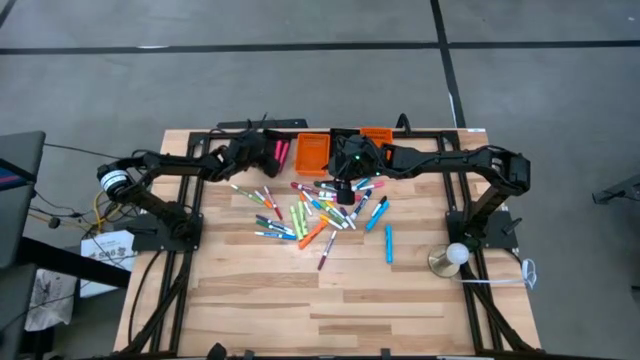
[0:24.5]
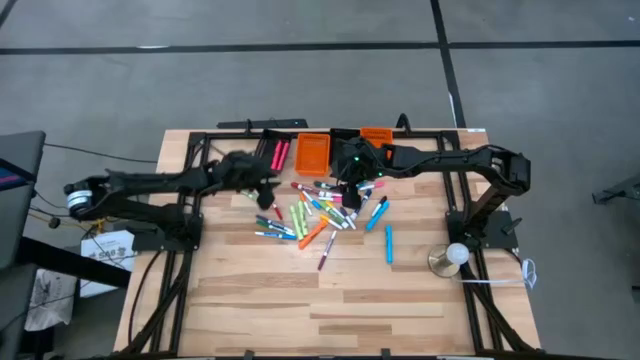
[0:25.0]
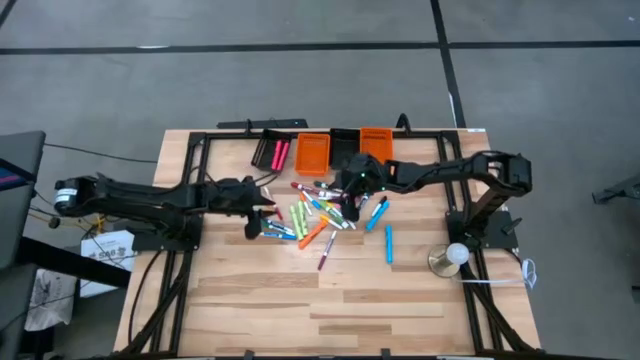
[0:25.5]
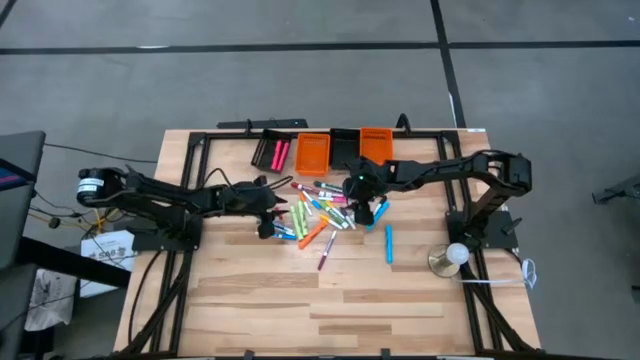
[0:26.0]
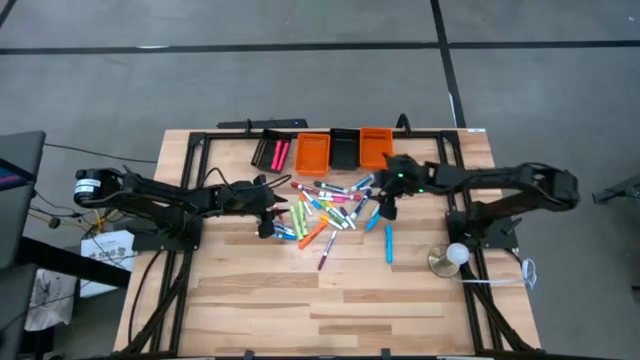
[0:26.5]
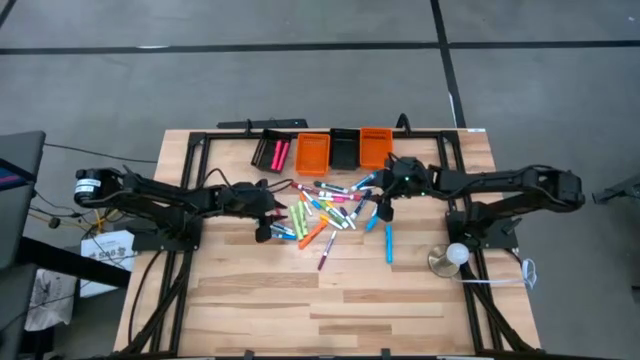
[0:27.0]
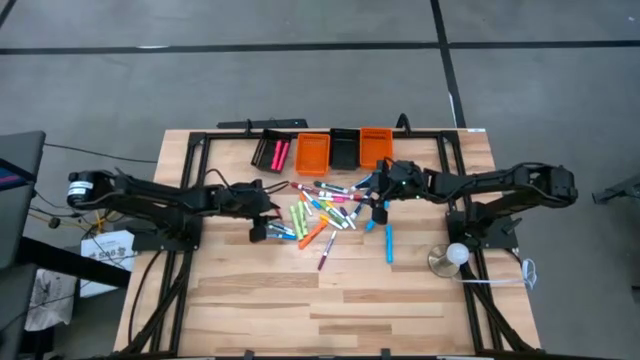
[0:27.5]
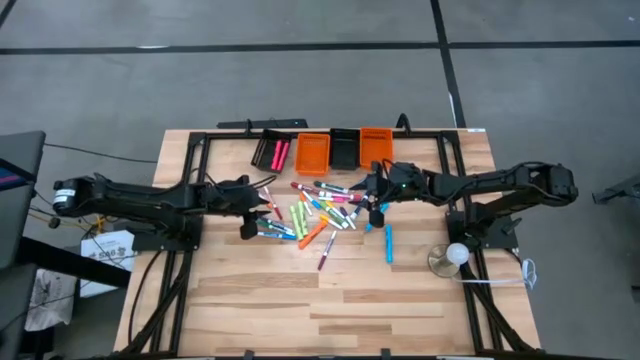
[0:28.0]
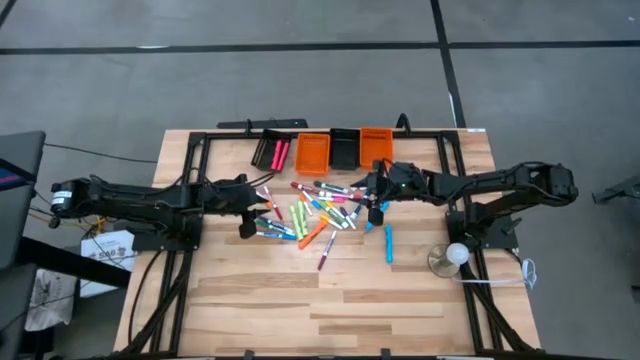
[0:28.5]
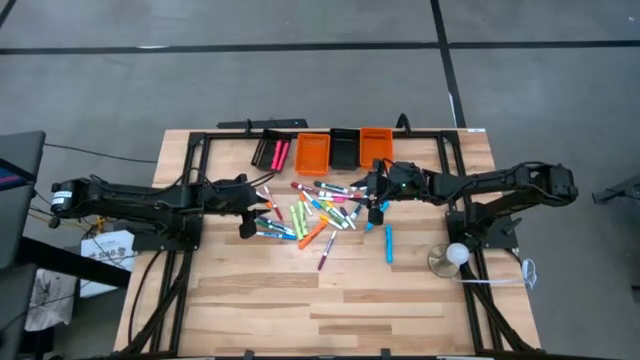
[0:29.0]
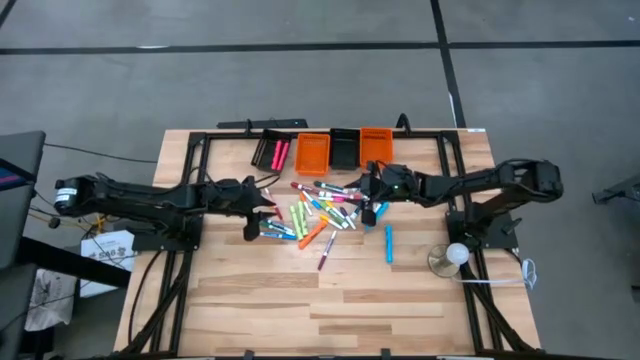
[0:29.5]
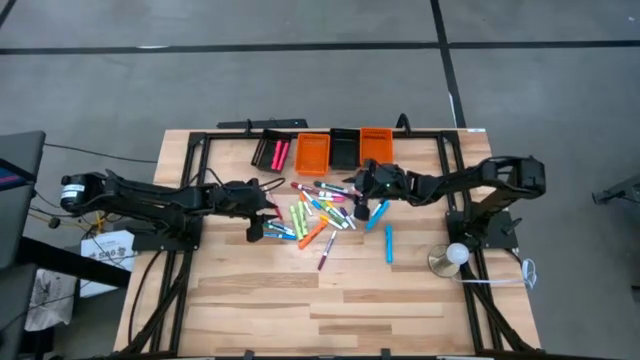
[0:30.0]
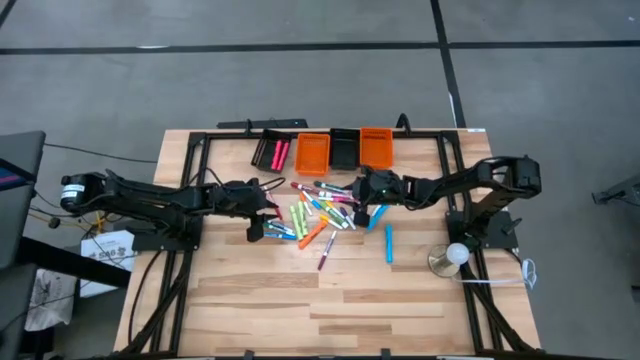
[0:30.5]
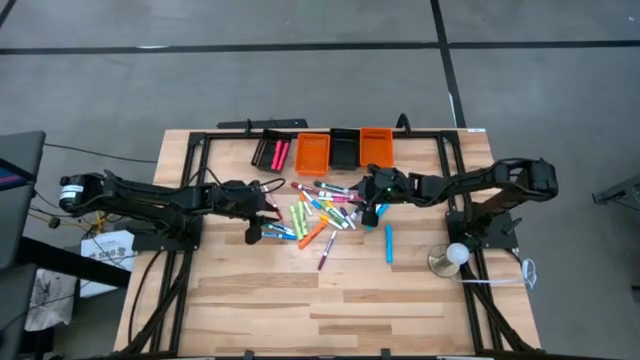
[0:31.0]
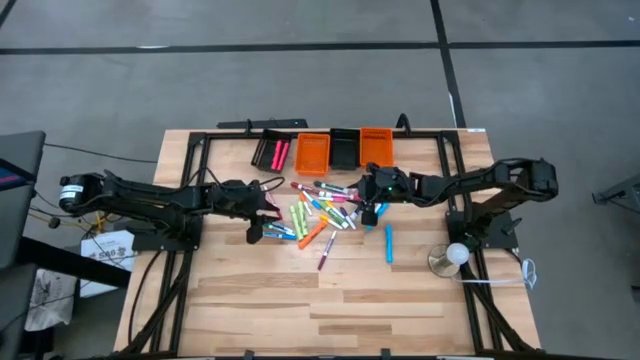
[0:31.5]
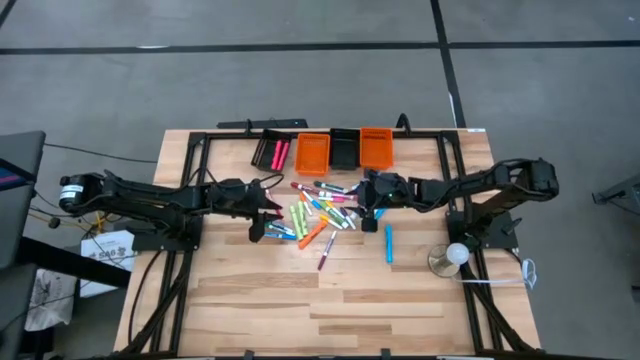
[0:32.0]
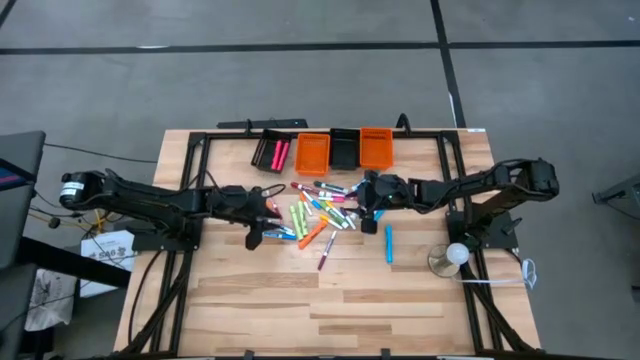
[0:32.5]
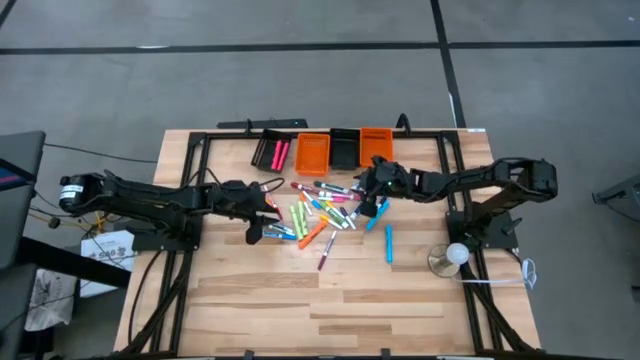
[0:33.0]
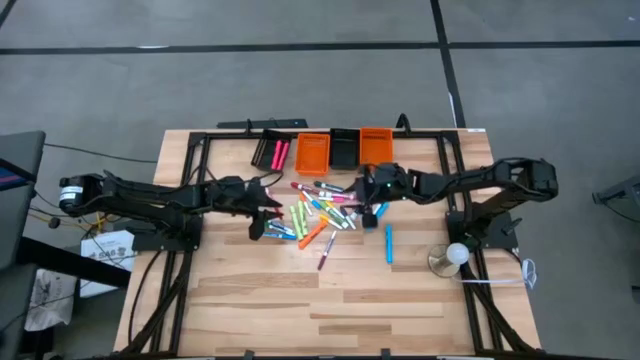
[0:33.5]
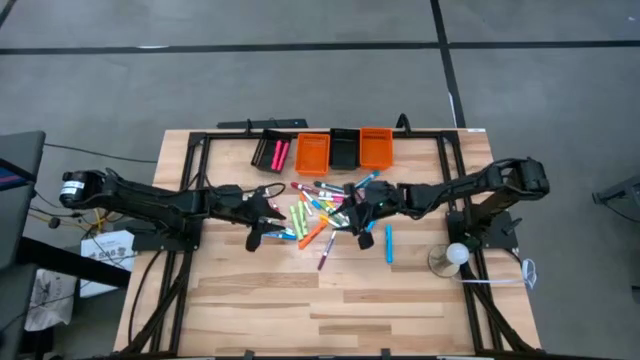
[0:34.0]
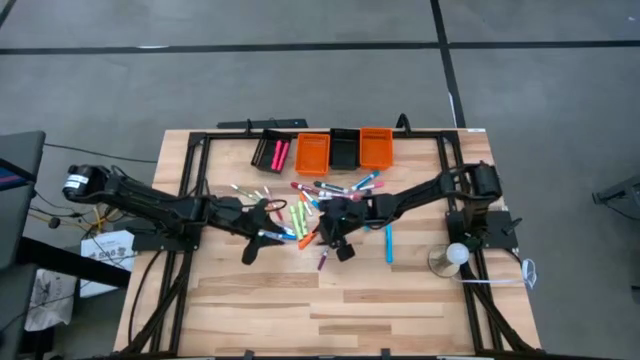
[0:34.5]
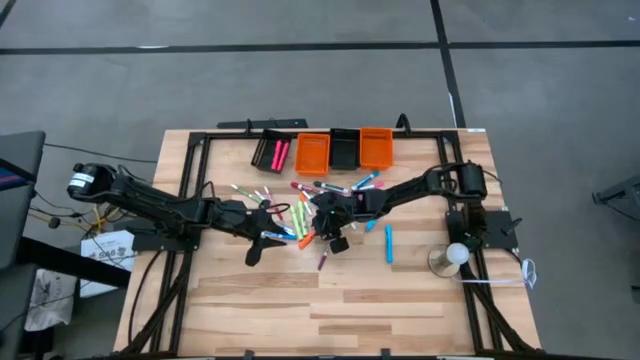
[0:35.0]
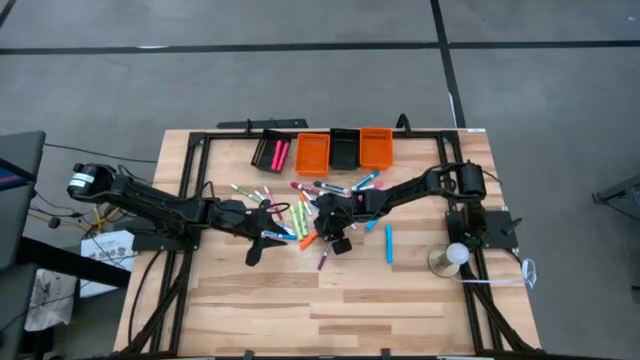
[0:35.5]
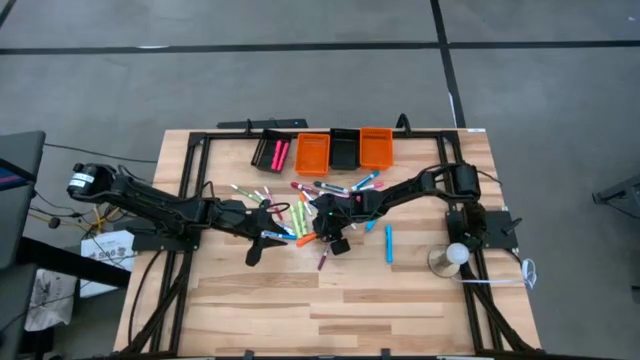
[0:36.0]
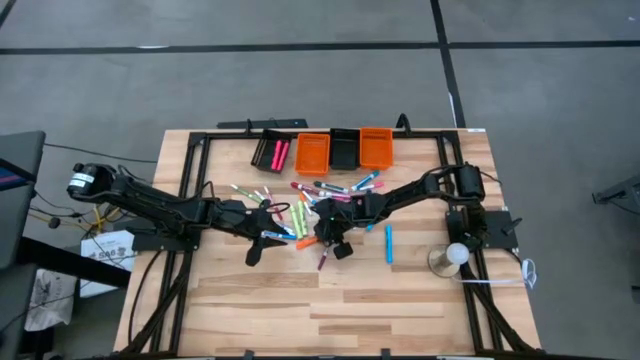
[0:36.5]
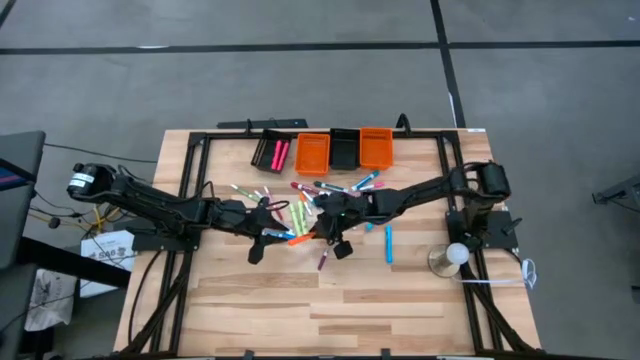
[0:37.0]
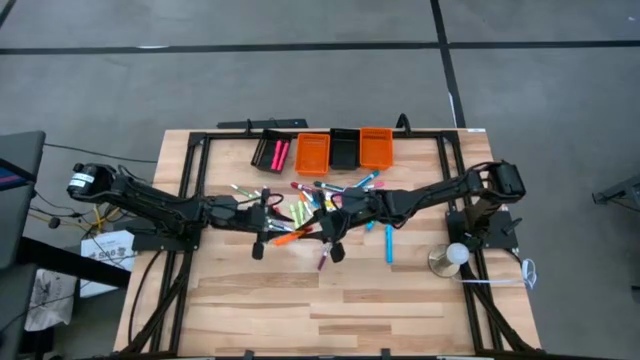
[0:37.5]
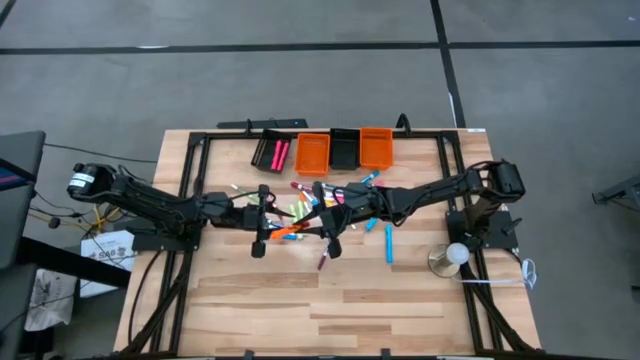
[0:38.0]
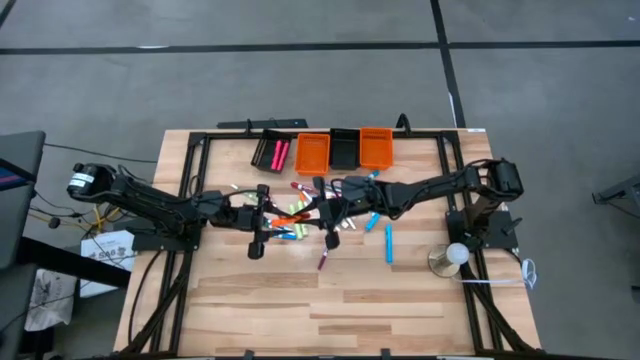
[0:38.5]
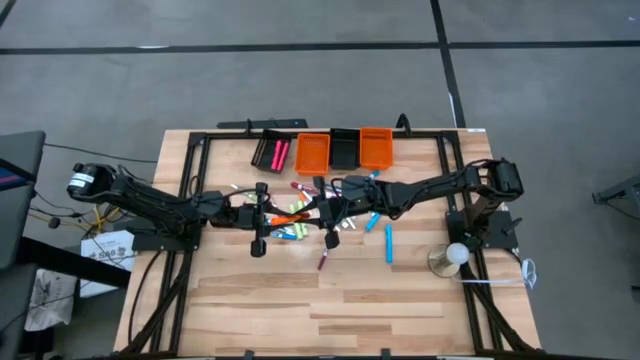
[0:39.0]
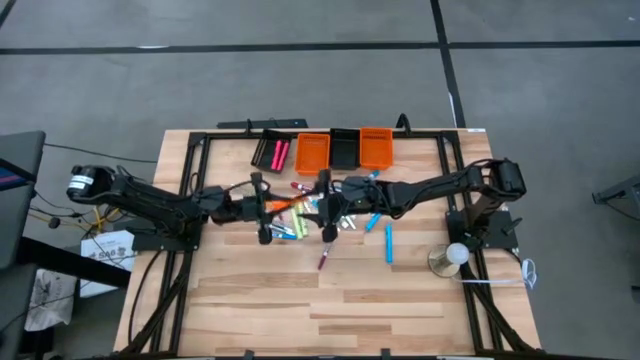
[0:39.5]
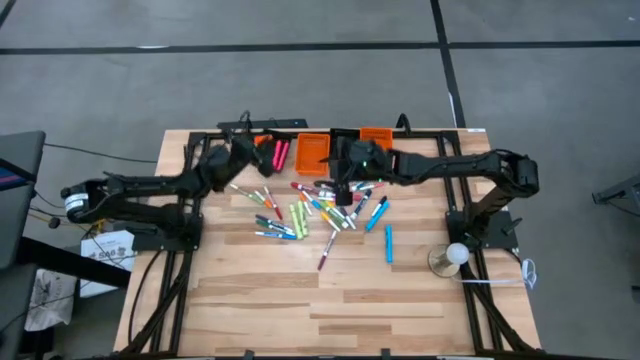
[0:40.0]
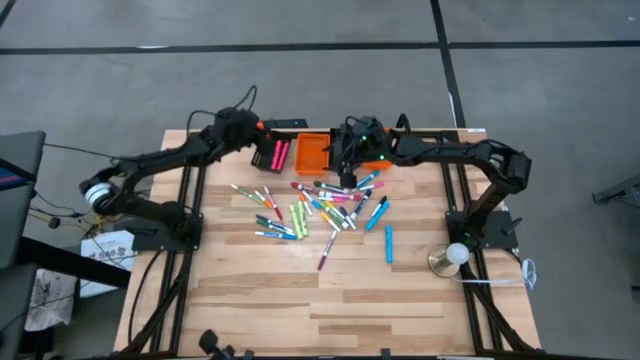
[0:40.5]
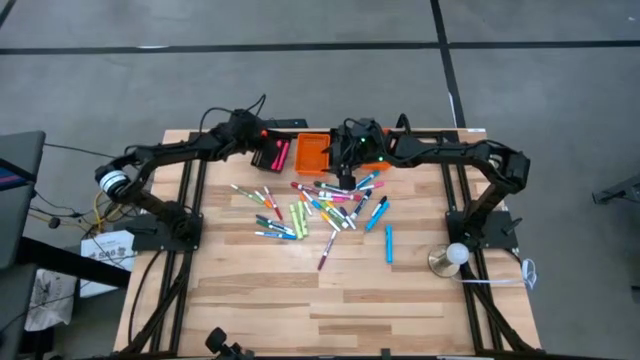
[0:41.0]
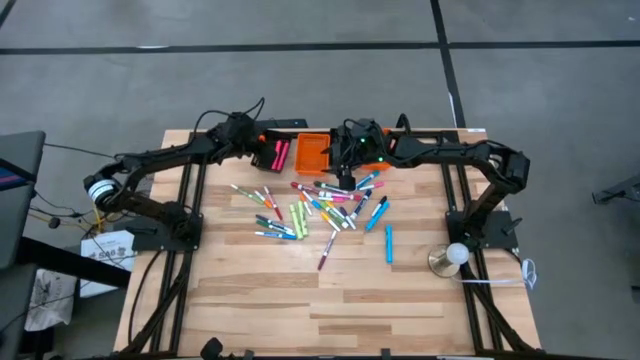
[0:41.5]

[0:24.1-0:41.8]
Task: Pick & Place Markers
Put the big orange highlighter pen into the left black basket

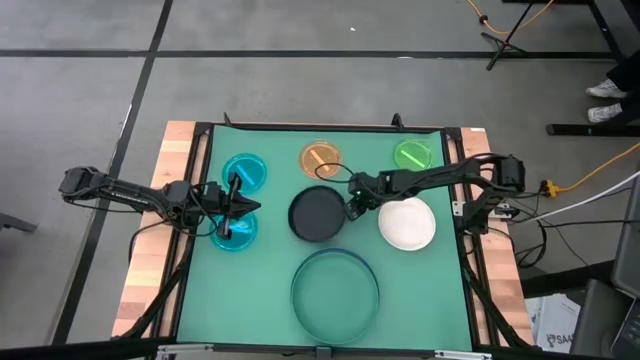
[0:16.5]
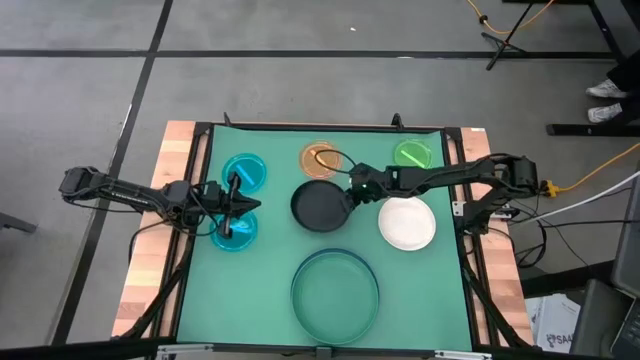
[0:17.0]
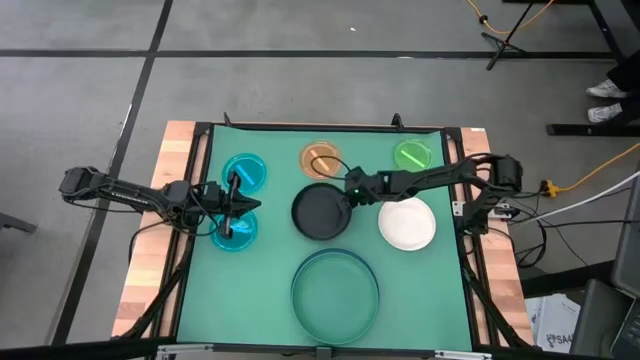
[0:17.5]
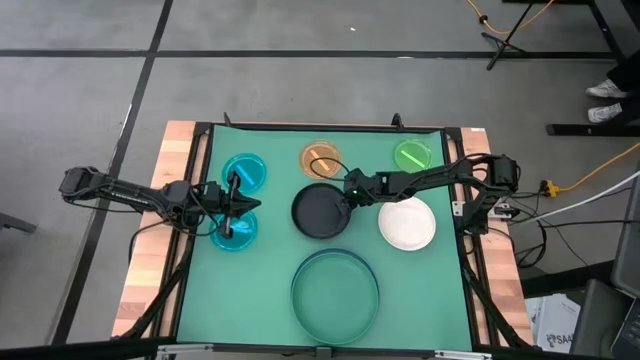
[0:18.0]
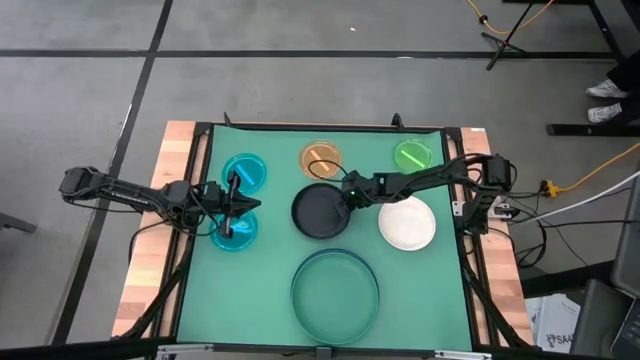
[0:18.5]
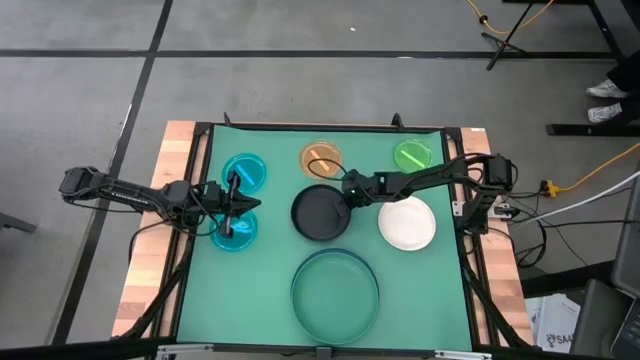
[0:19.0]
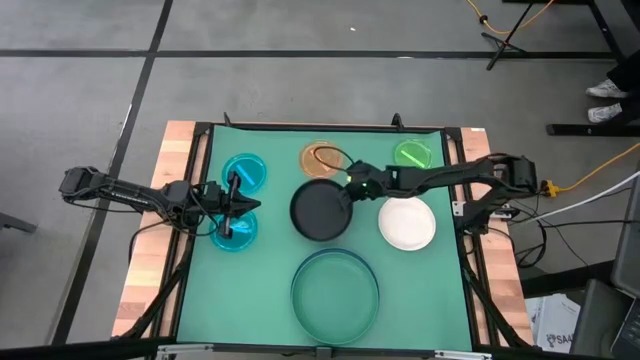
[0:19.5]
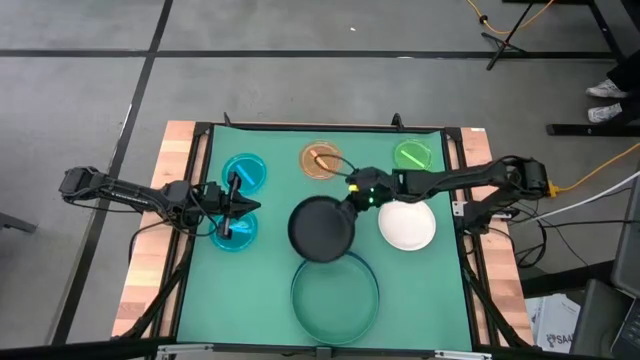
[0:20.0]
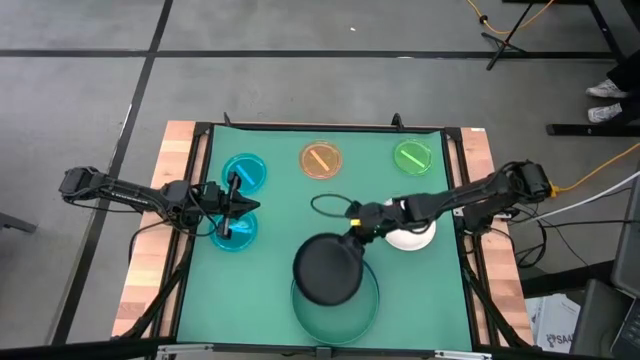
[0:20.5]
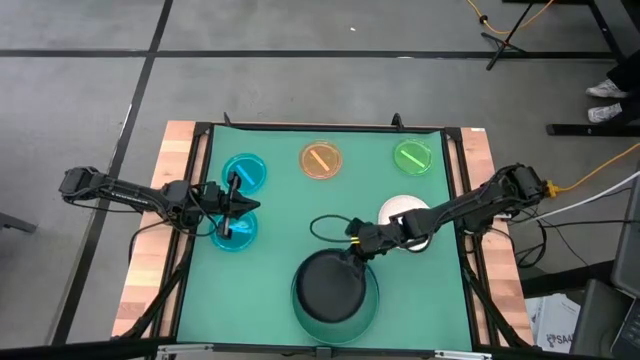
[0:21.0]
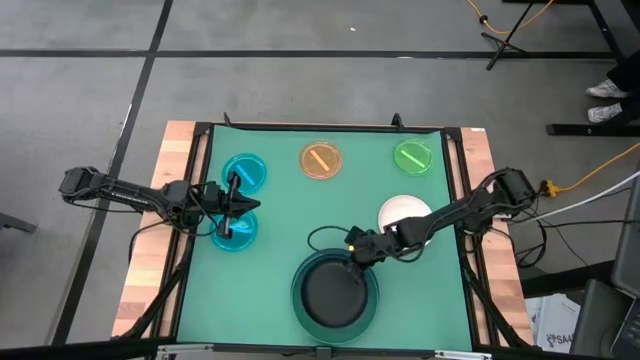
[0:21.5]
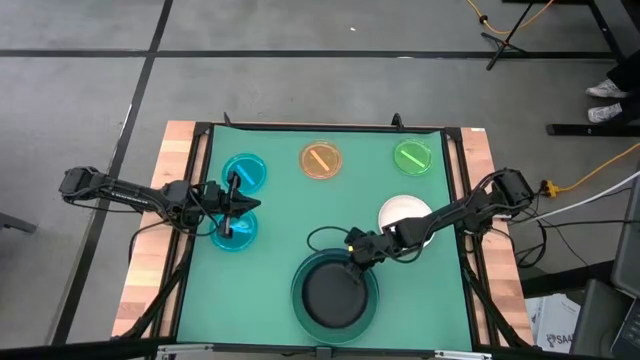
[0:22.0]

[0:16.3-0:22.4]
Task: Stack plastic plates
Stack the black plate on top of the green plate
